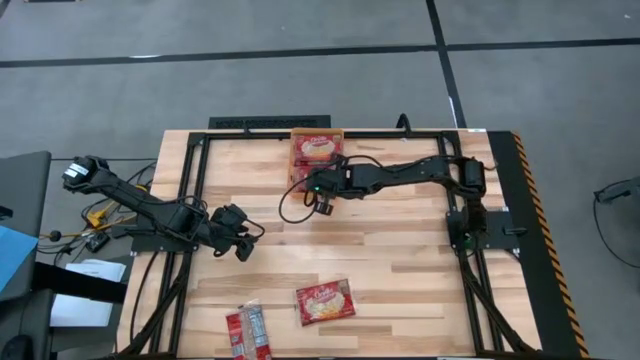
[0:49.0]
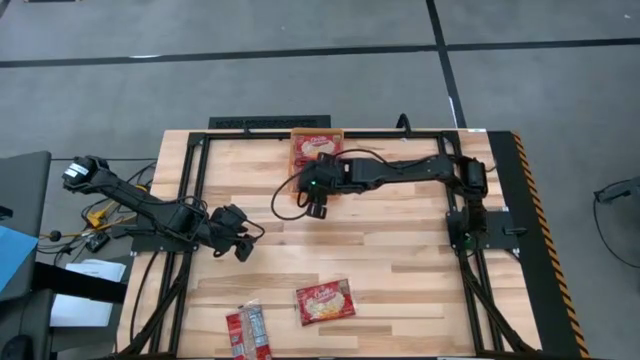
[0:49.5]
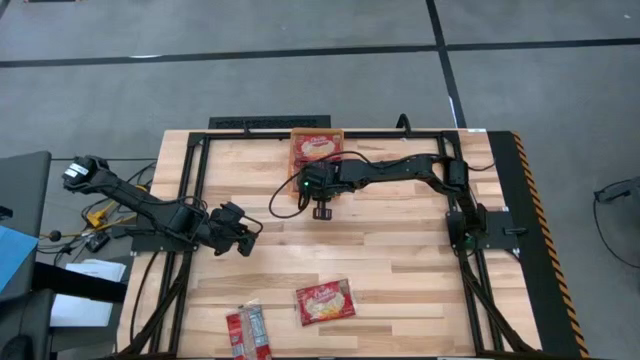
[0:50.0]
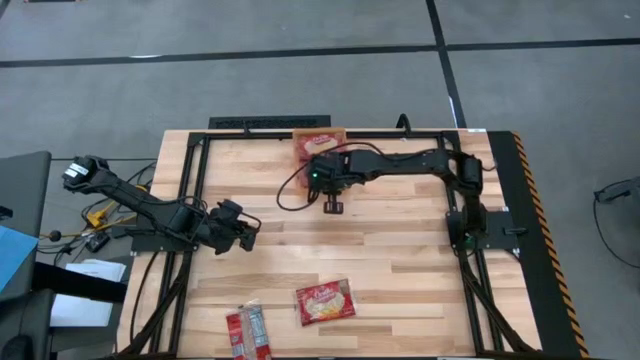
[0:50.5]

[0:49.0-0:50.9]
Task: Sort popcorn bags into baskets
Adjust the orange bin

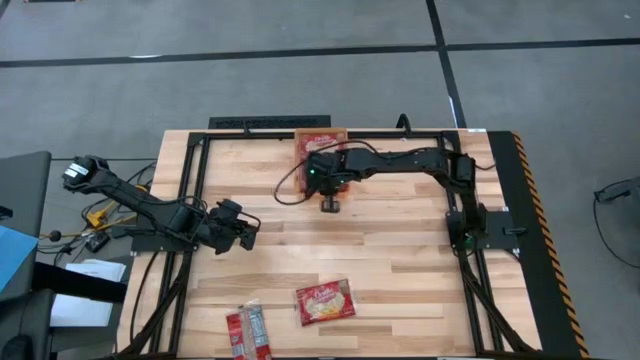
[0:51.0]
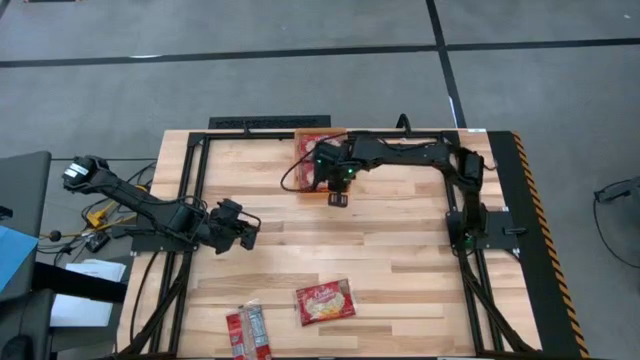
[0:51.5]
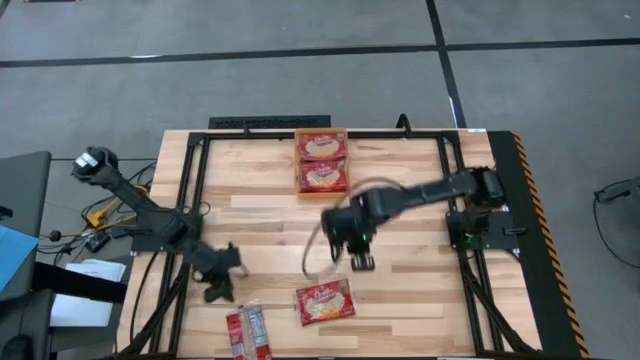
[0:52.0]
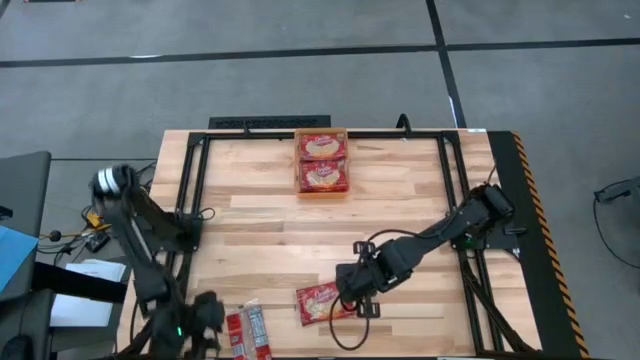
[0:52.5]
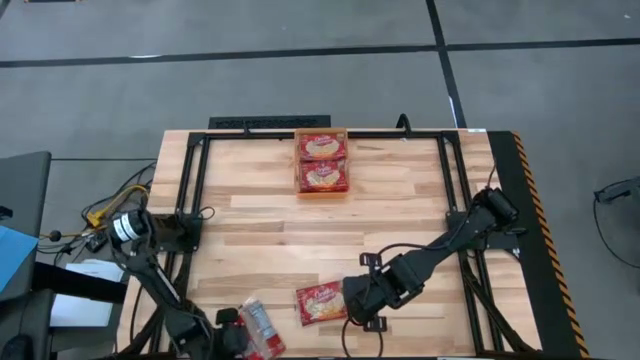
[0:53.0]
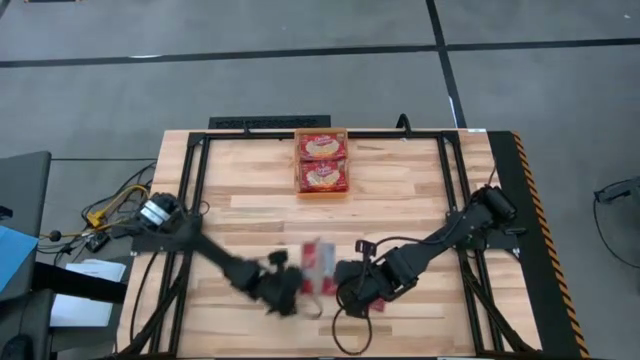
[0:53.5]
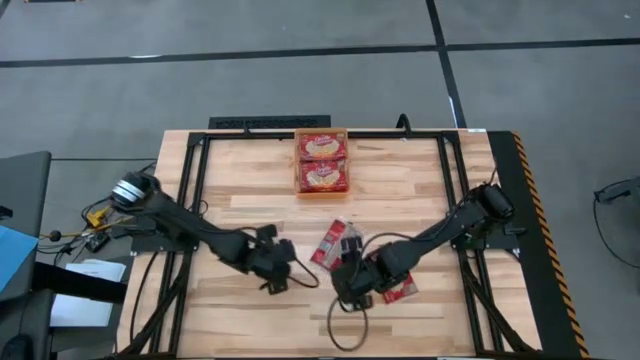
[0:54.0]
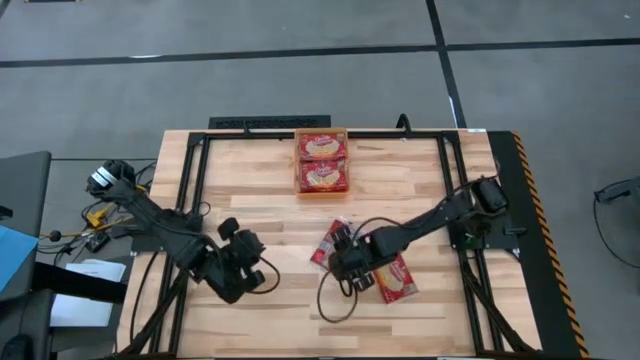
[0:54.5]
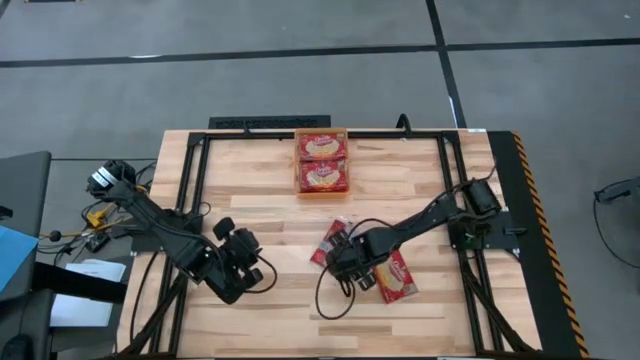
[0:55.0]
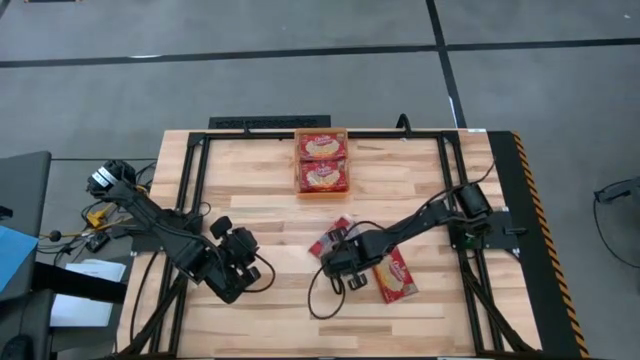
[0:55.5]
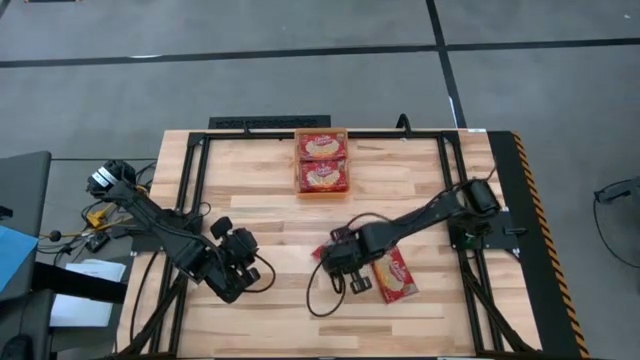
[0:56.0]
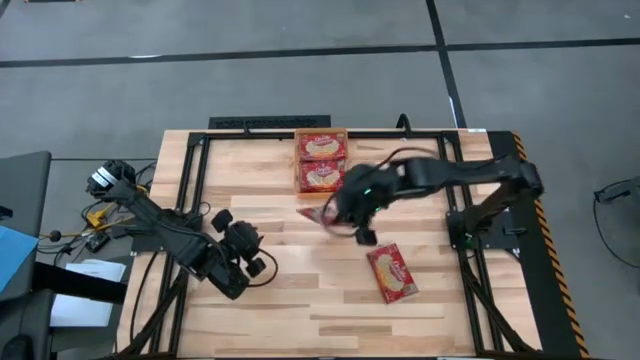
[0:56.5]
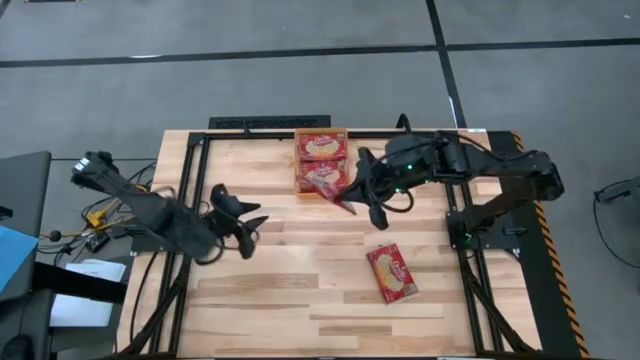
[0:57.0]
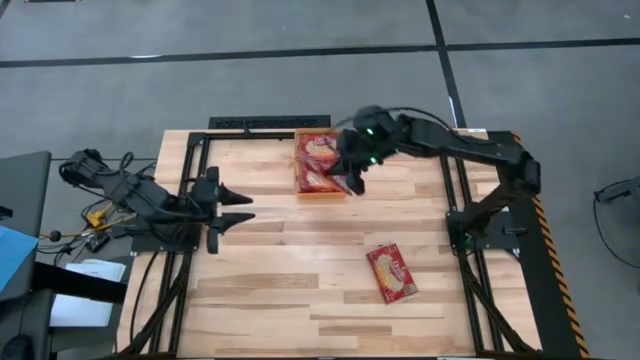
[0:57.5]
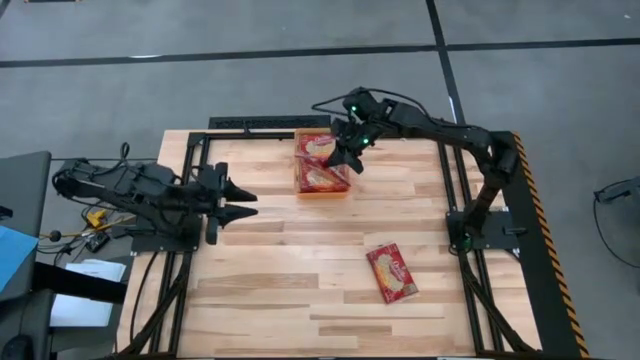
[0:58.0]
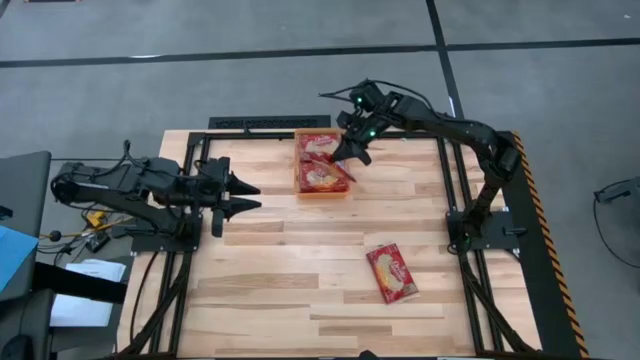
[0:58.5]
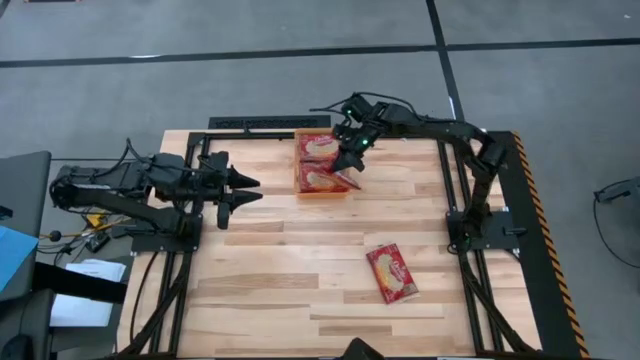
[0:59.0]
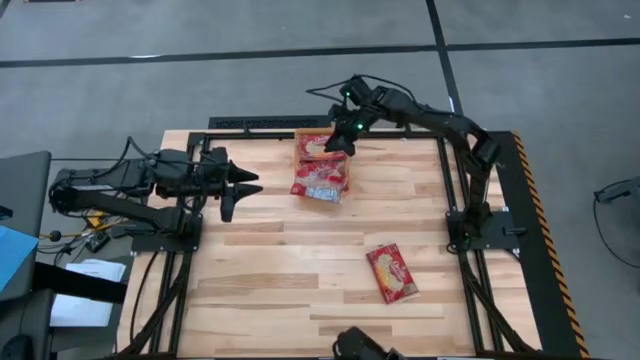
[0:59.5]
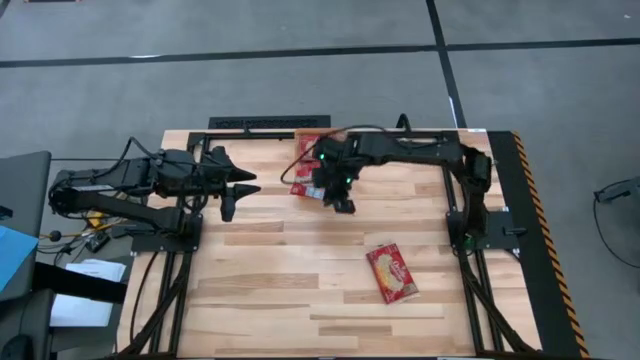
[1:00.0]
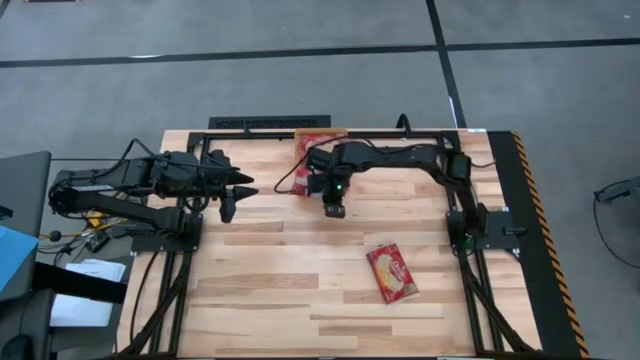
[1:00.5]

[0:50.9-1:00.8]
Put the red popcorn bag into the orange bin

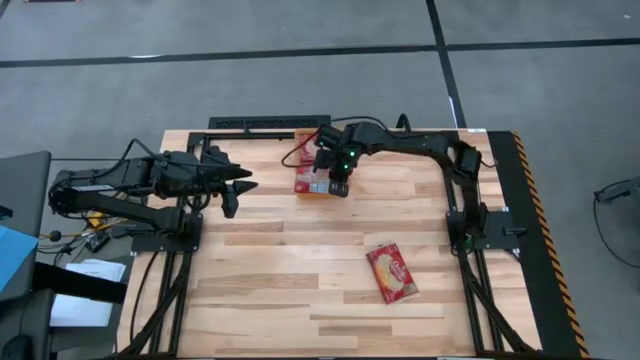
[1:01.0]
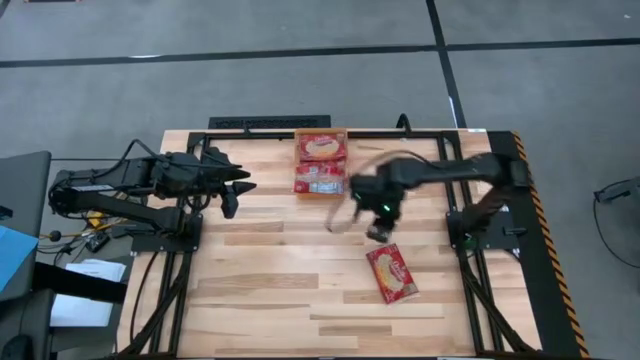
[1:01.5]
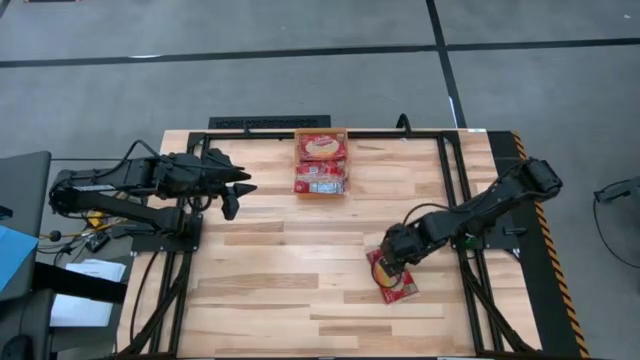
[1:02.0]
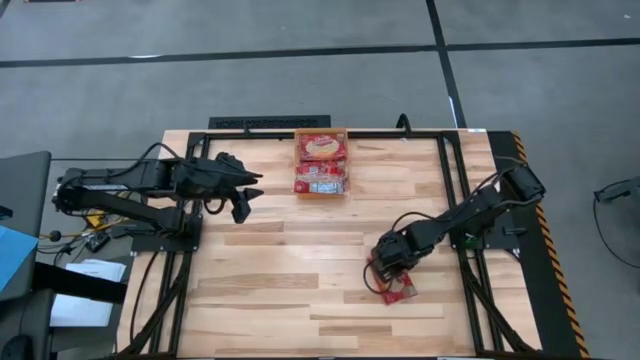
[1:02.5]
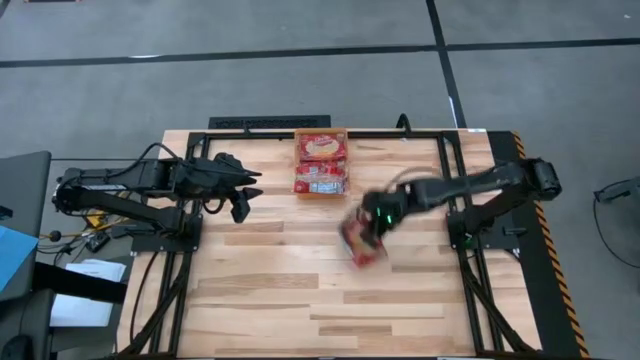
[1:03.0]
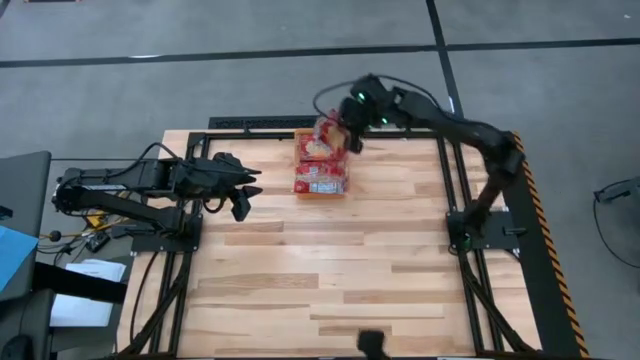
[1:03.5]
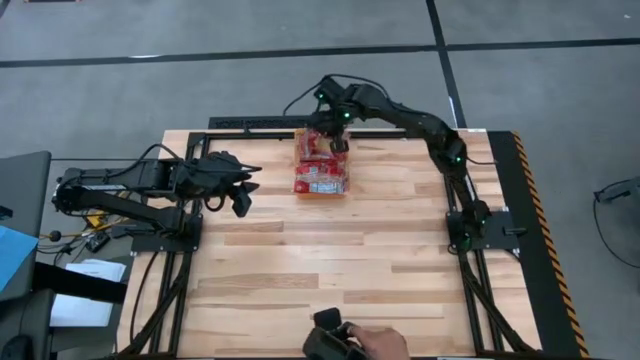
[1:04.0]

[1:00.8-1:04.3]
Put the red popcorn bag into the orange bin

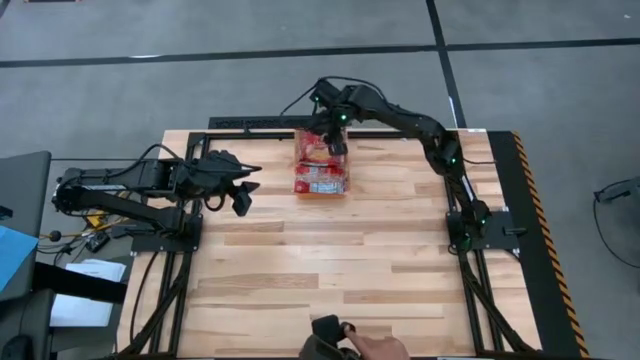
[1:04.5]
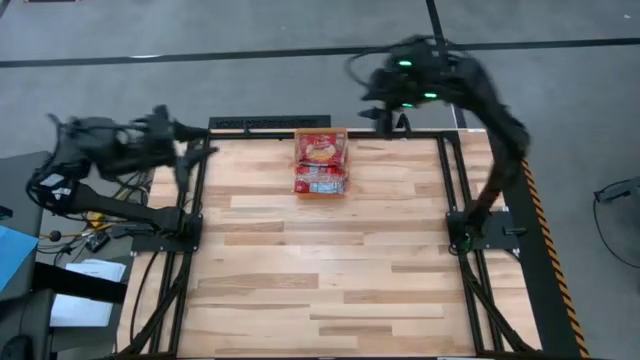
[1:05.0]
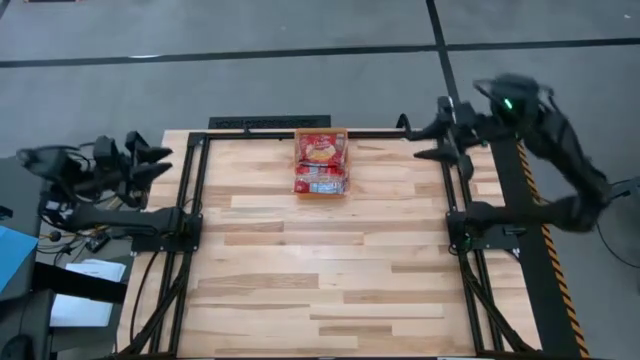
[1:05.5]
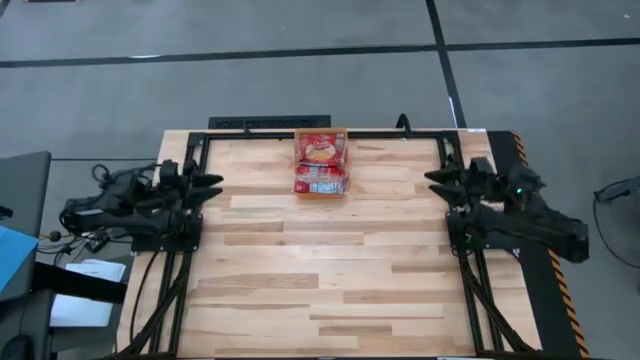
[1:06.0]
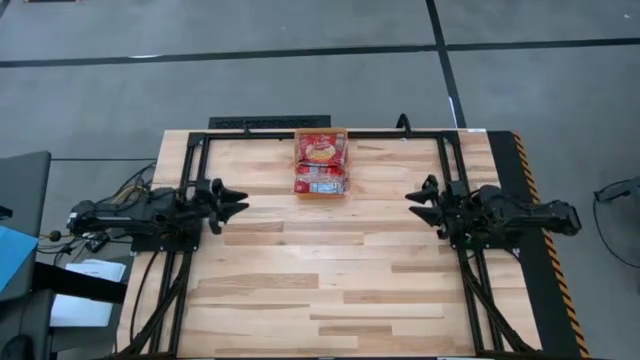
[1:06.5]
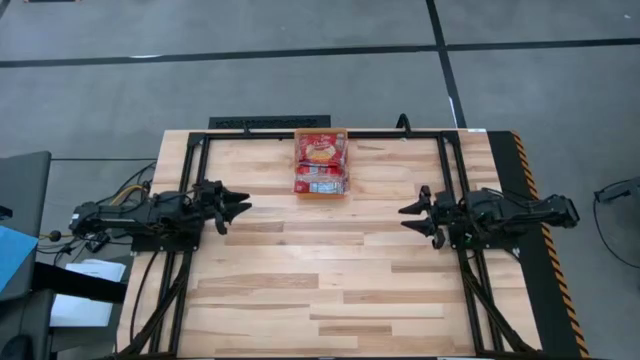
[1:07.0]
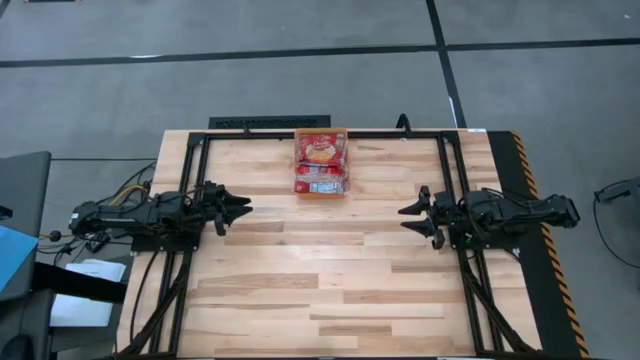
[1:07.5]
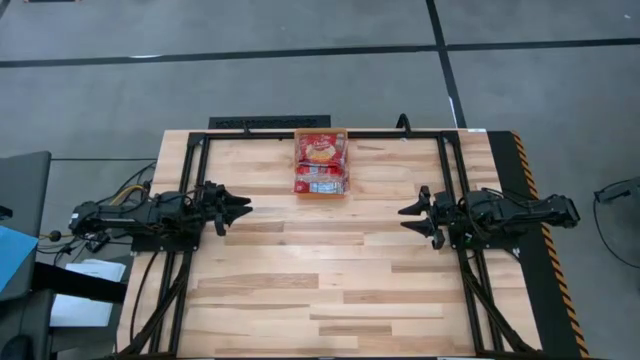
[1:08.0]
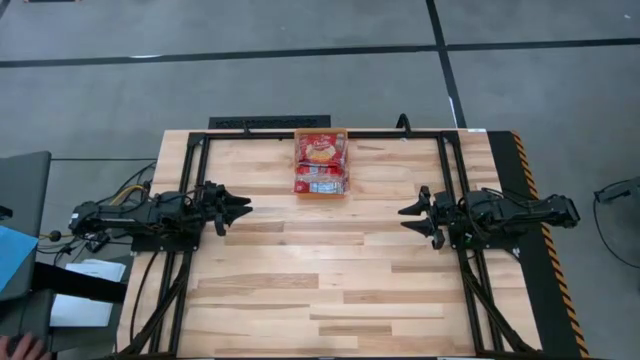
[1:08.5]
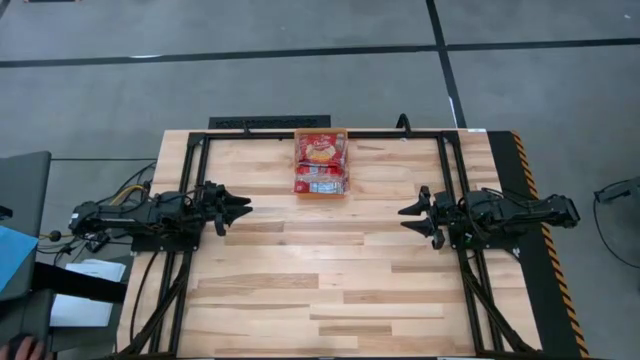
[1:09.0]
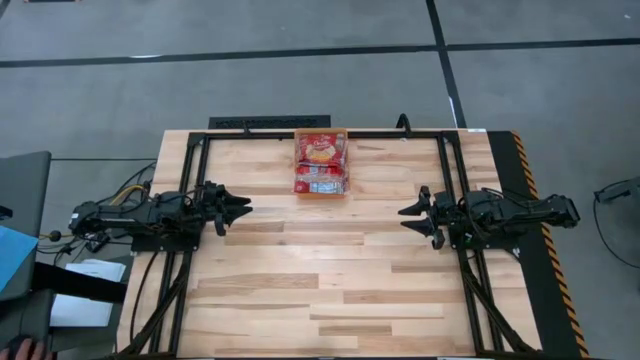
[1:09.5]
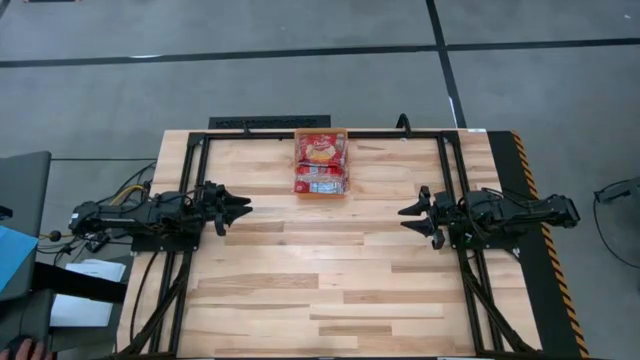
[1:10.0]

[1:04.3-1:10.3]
Return to Home Position
